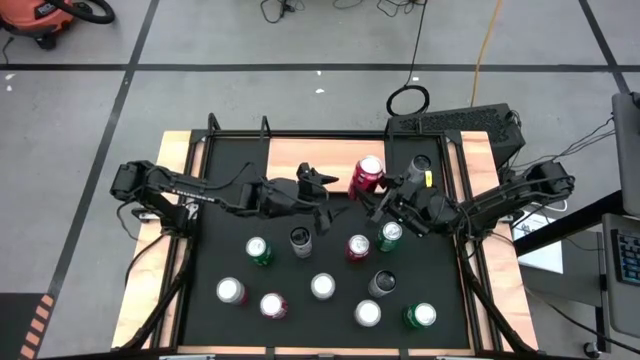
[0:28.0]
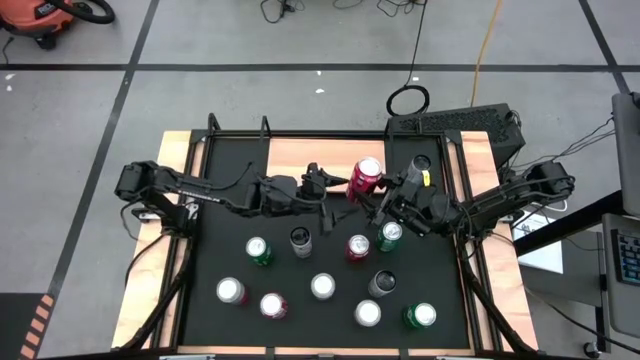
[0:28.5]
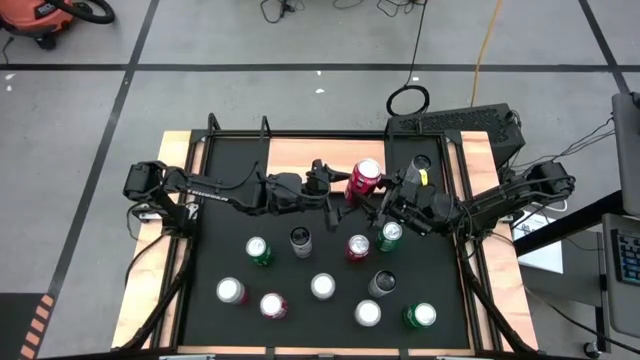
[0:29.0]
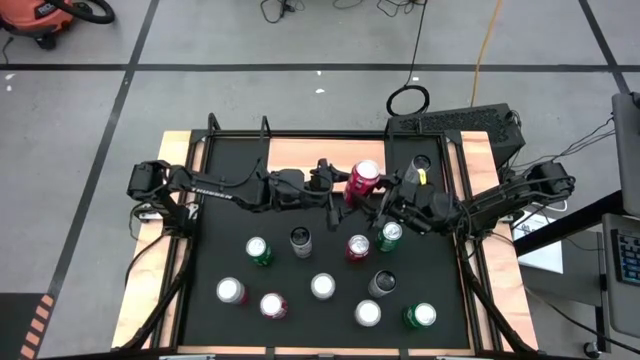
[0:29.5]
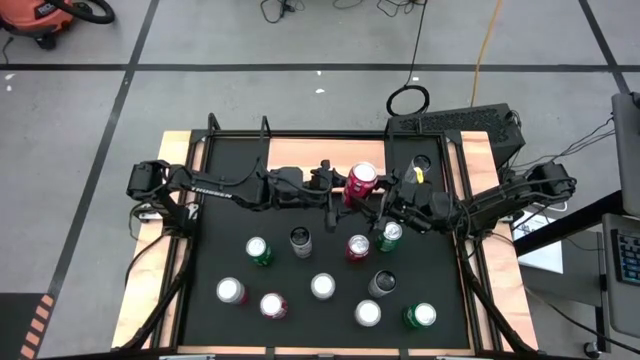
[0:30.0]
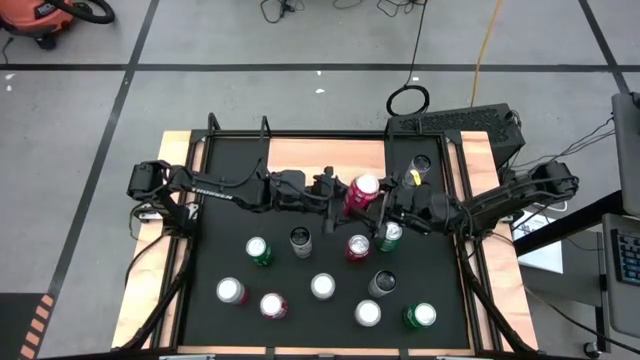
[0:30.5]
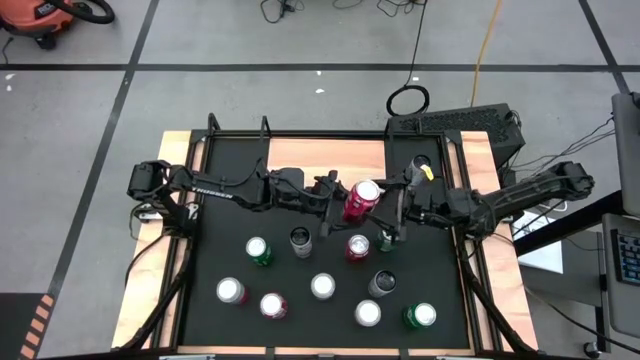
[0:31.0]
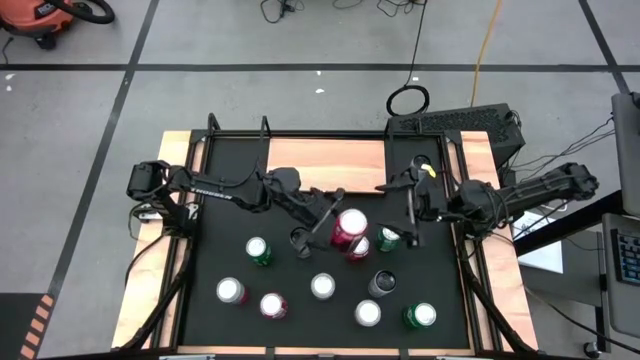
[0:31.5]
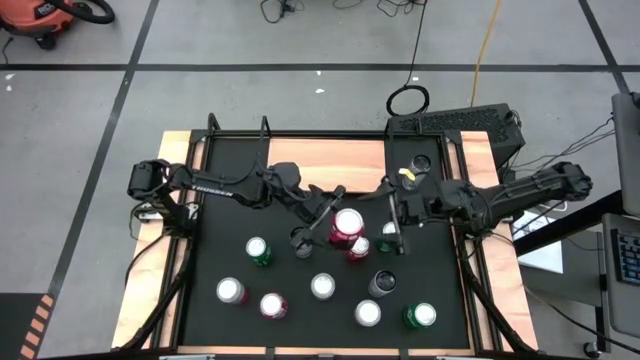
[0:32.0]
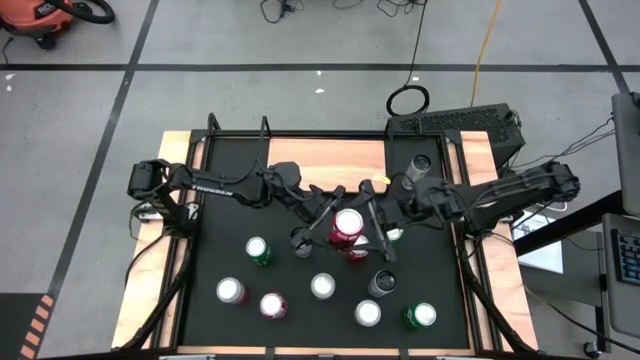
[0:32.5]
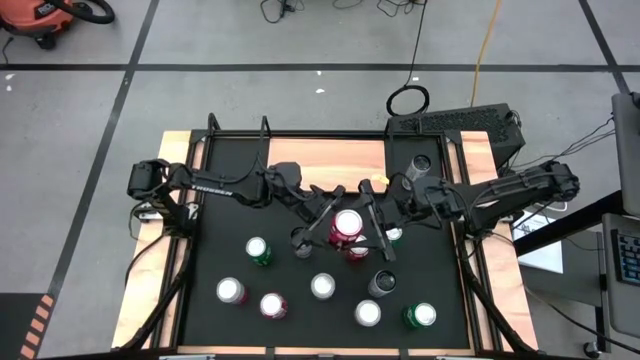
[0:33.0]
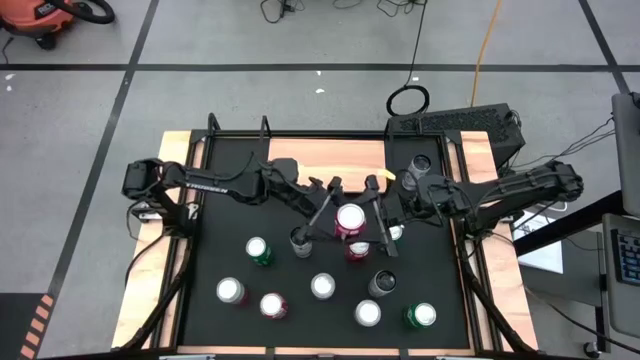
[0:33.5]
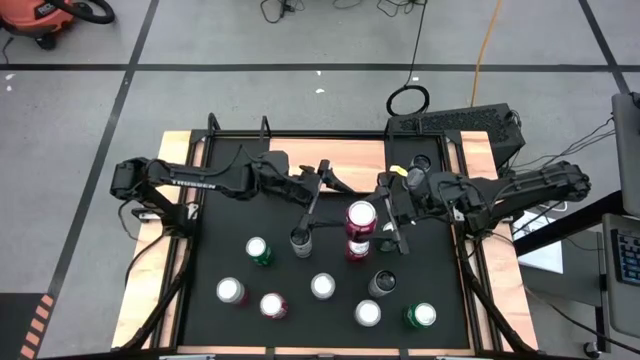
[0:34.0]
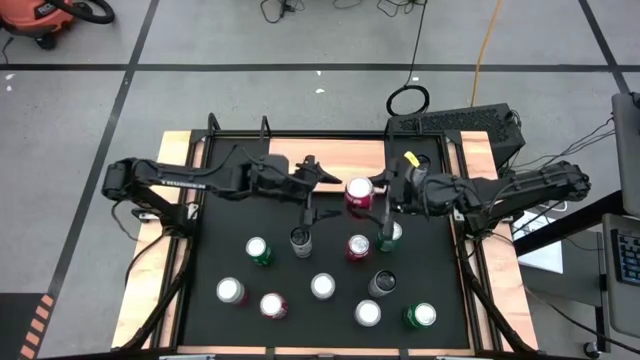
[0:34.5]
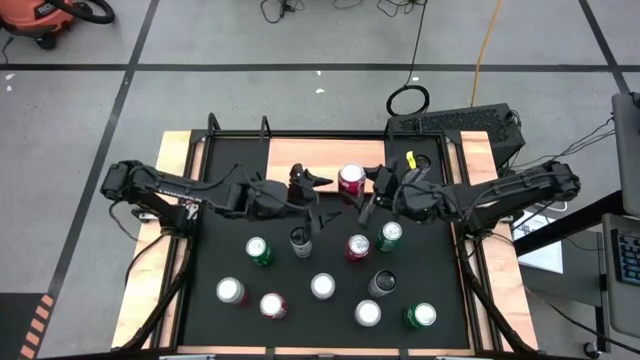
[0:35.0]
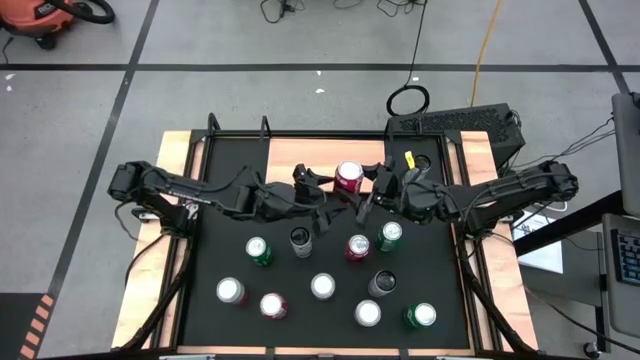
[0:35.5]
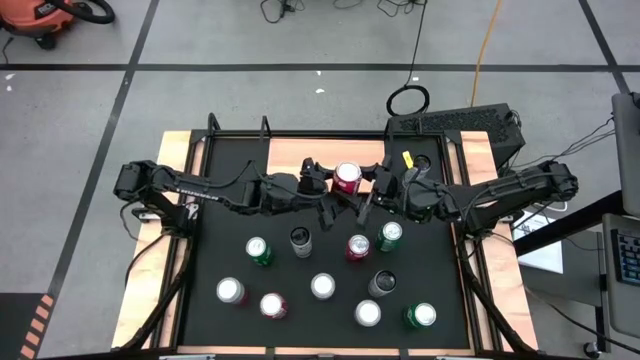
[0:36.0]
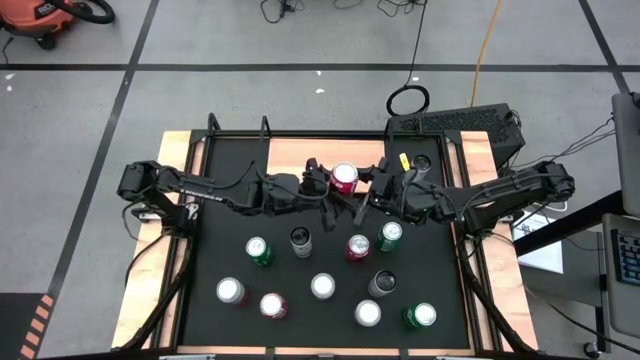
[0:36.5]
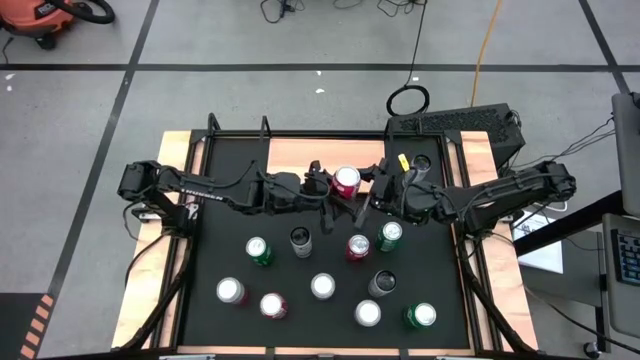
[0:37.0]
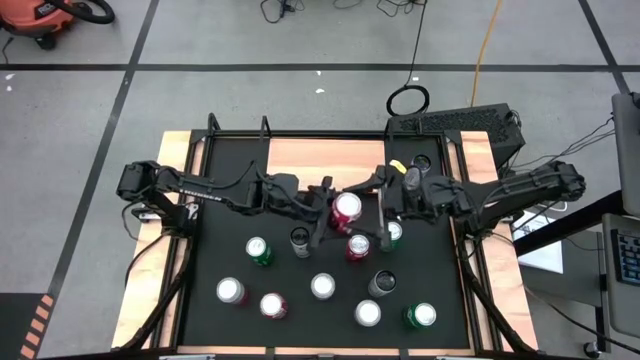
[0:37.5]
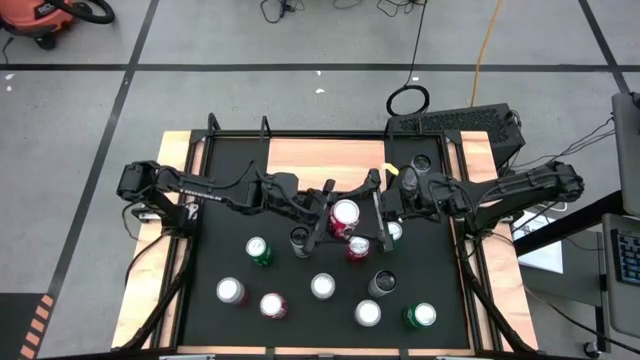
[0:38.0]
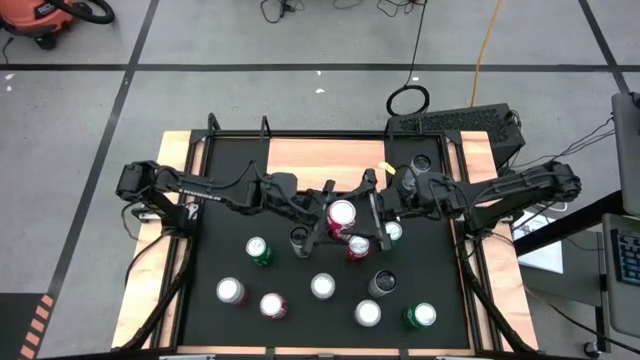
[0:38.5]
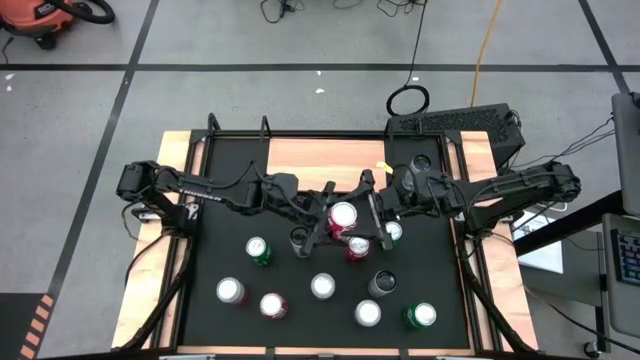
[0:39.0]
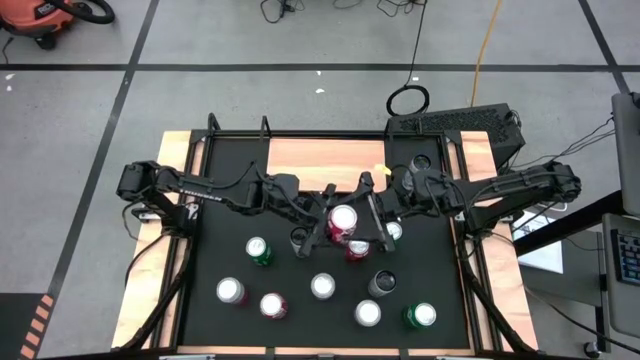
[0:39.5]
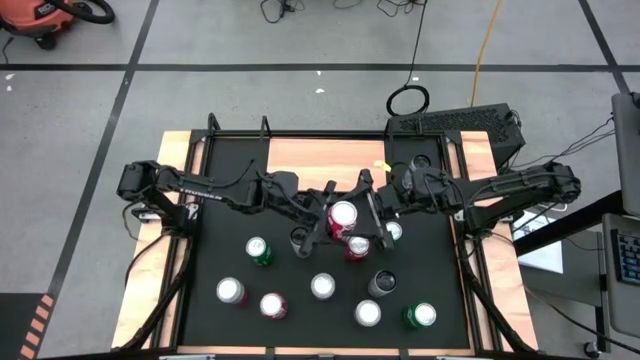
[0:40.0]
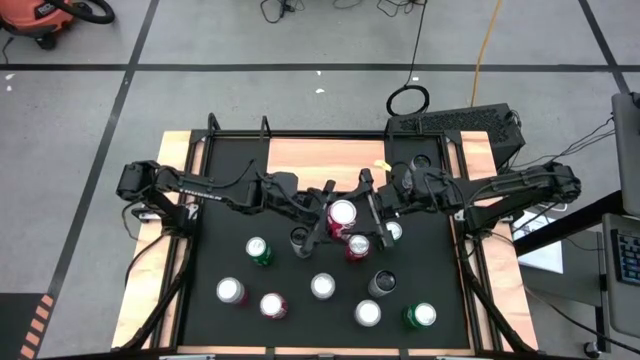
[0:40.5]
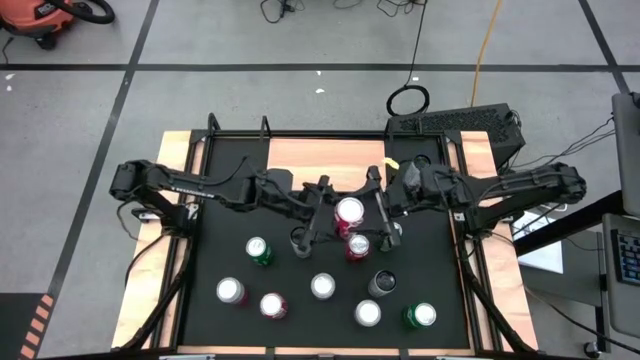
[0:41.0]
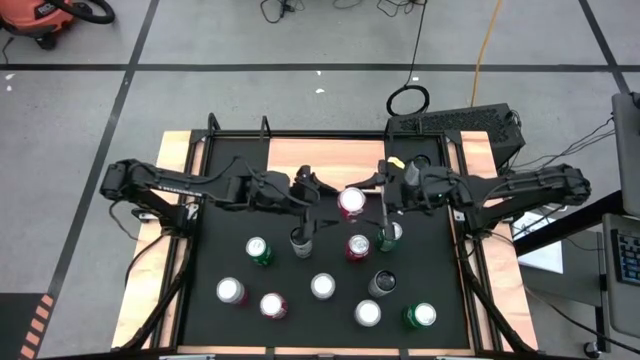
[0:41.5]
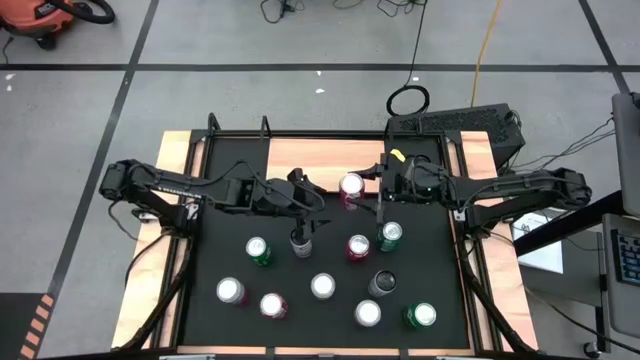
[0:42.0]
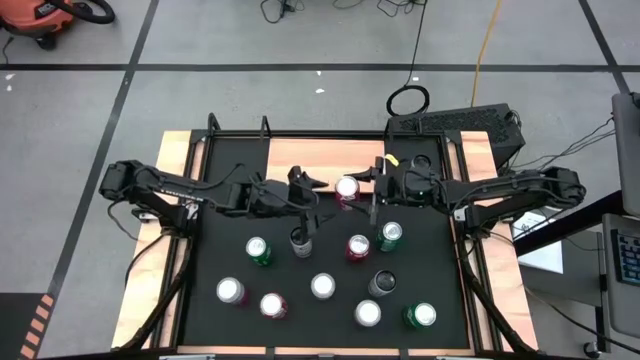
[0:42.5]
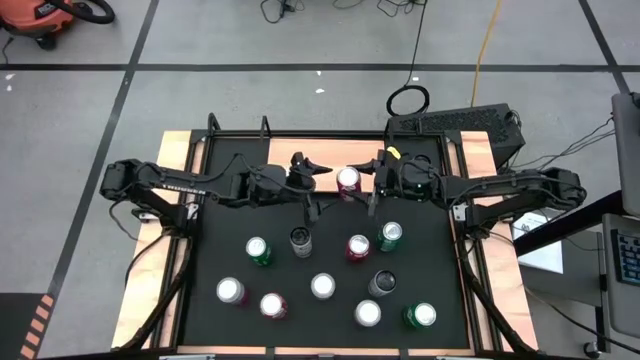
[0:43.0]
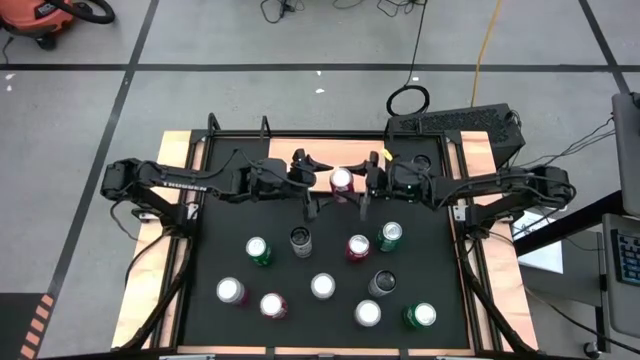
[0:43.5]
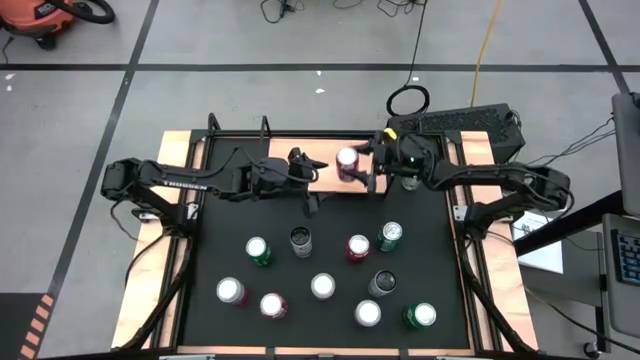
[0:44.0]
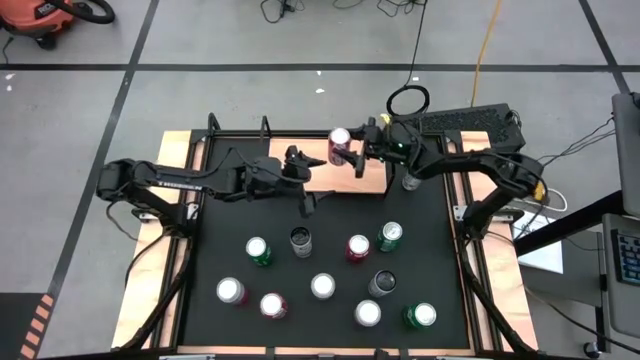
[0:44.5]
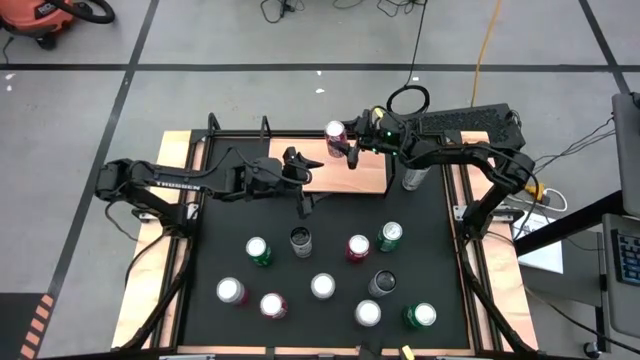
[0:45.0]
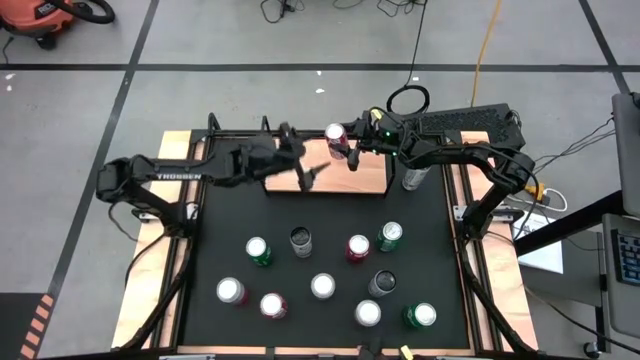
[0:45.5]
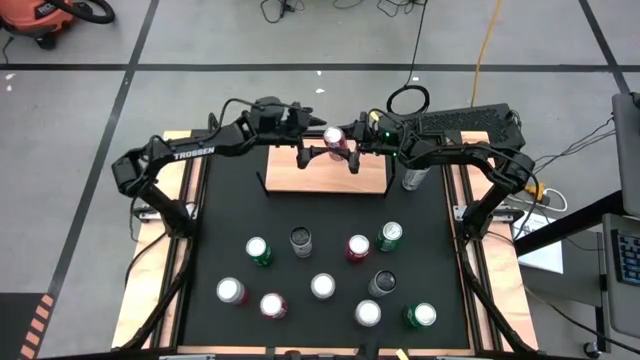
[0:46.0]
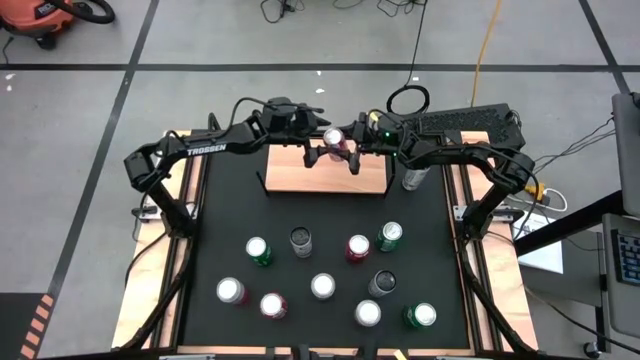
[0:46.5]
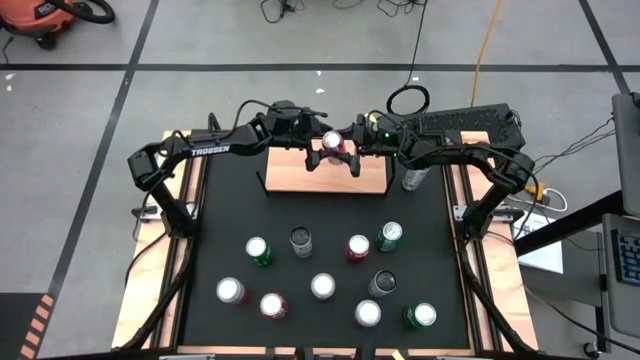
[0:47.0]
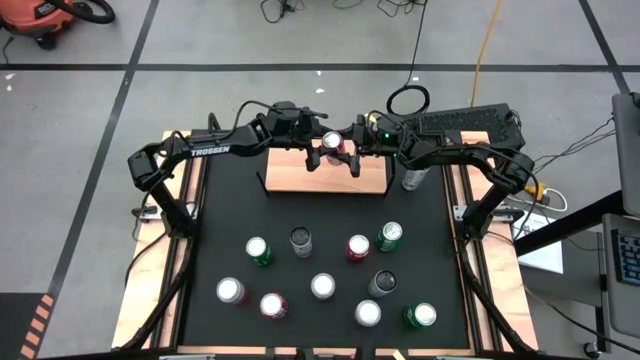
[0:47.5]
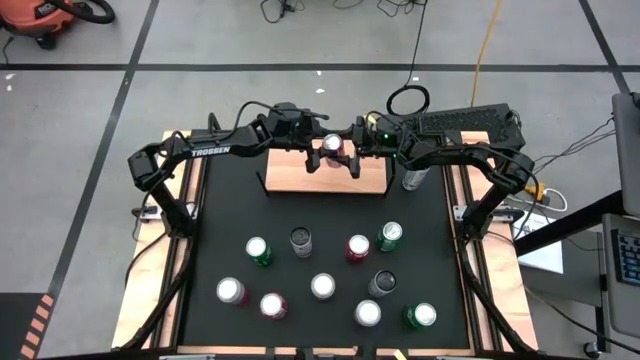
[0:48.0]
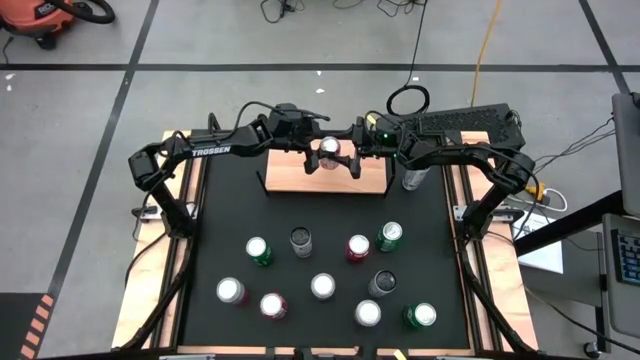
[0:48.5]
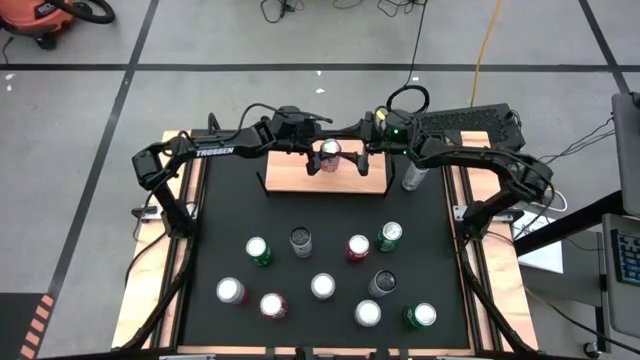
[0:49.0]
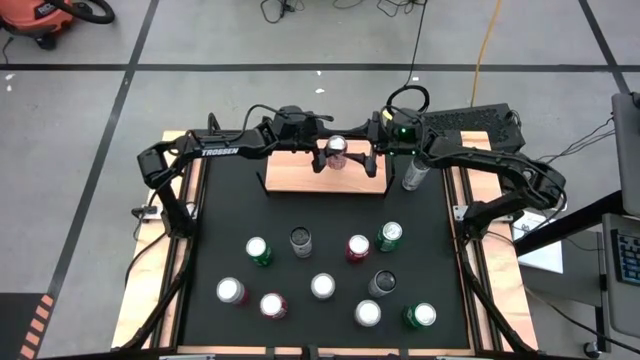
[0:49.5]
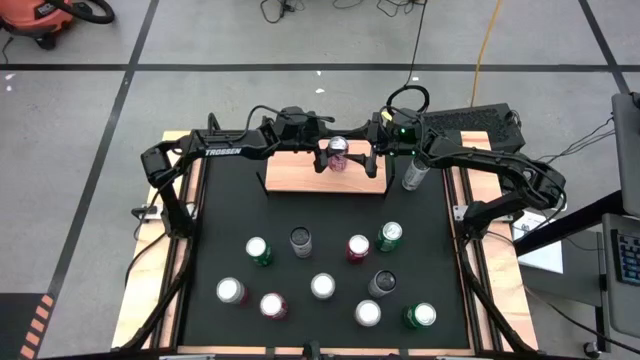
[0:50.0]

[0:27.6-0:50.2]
Task: Place canned beverage on shelf
Put the top red soda can on the shelf
